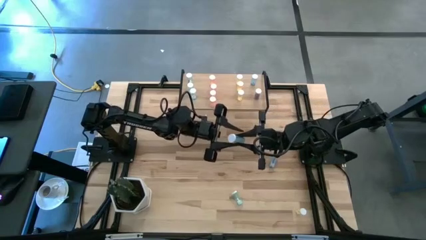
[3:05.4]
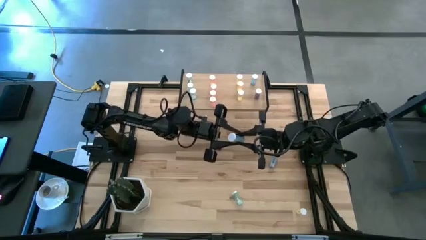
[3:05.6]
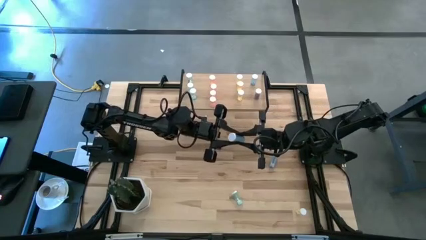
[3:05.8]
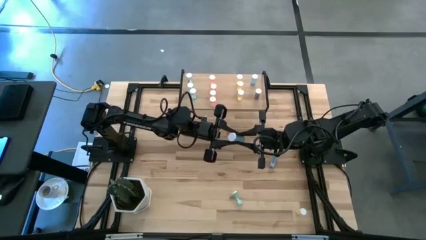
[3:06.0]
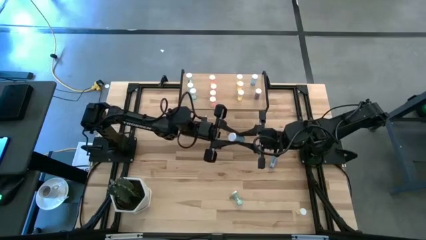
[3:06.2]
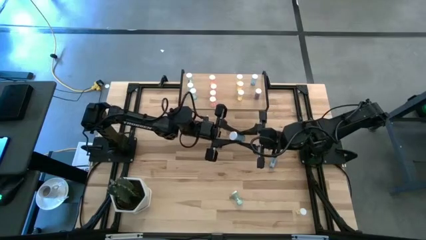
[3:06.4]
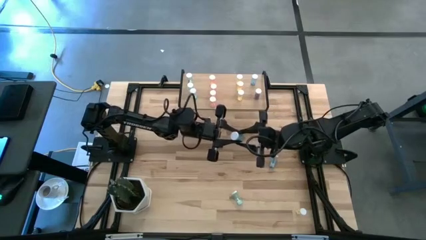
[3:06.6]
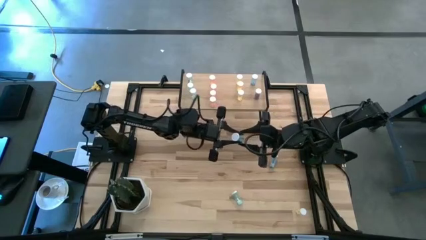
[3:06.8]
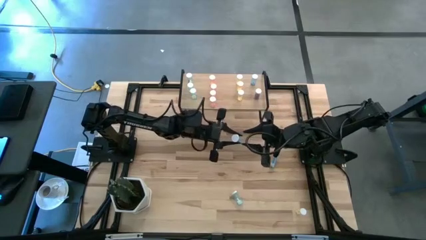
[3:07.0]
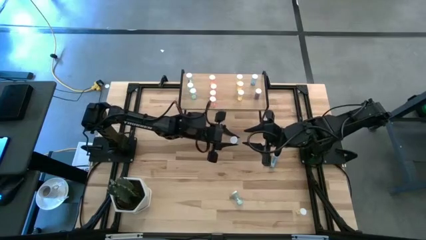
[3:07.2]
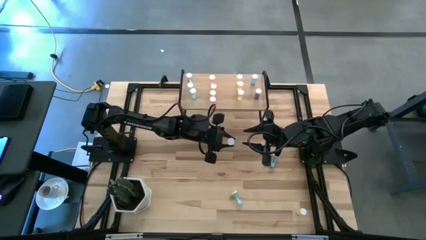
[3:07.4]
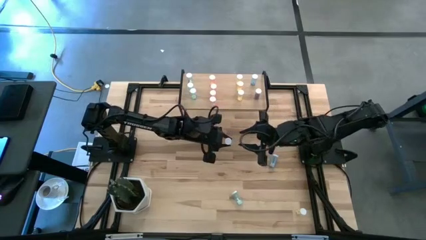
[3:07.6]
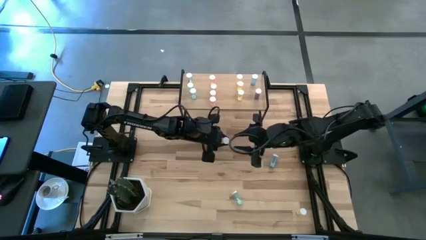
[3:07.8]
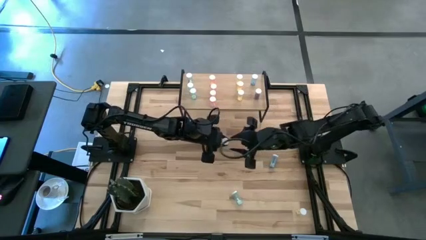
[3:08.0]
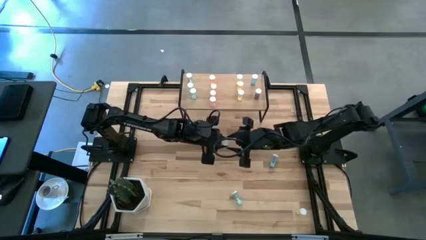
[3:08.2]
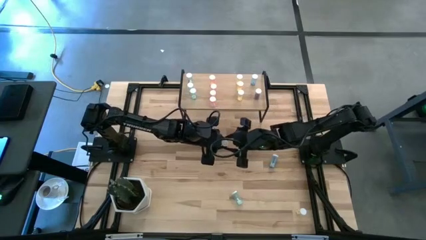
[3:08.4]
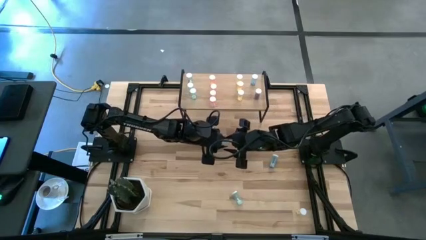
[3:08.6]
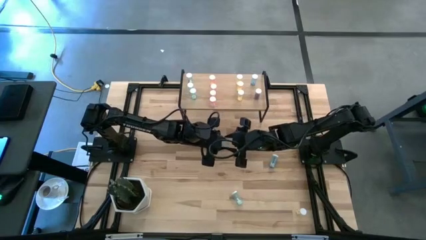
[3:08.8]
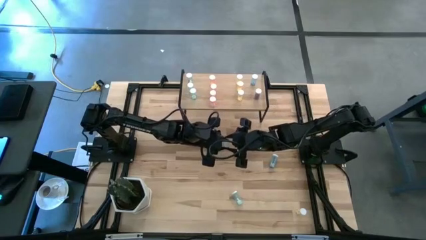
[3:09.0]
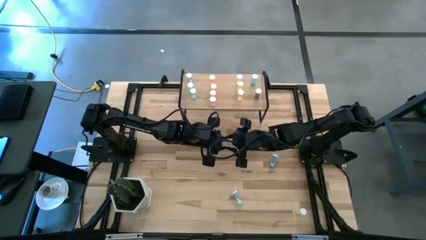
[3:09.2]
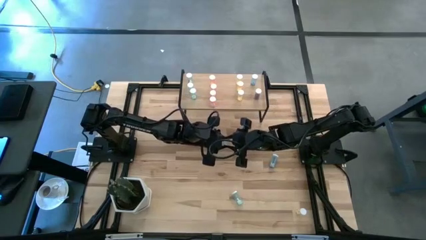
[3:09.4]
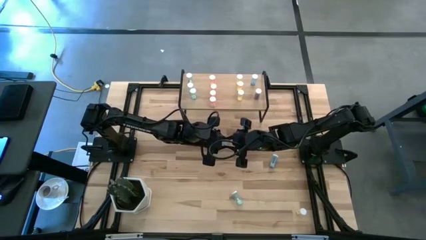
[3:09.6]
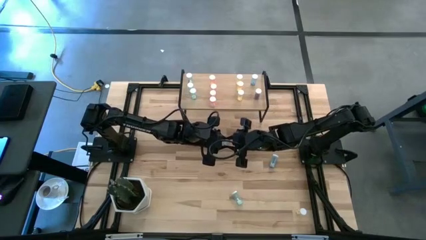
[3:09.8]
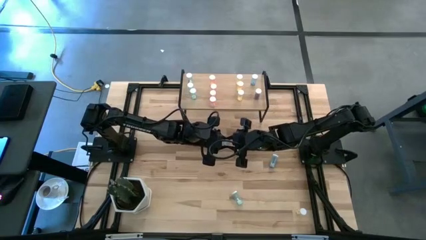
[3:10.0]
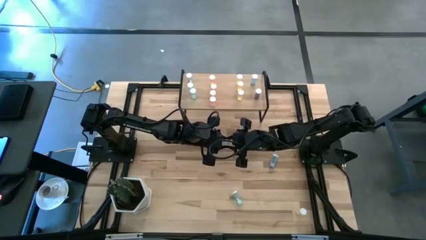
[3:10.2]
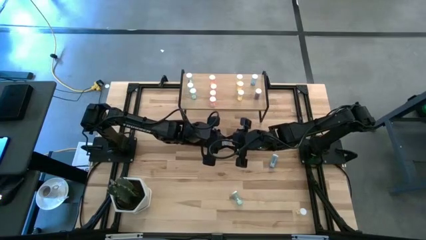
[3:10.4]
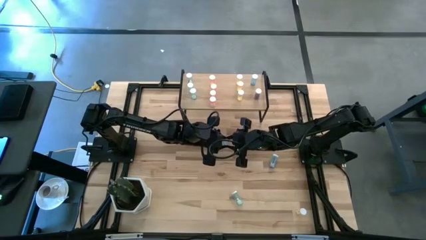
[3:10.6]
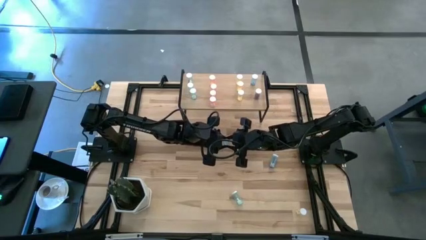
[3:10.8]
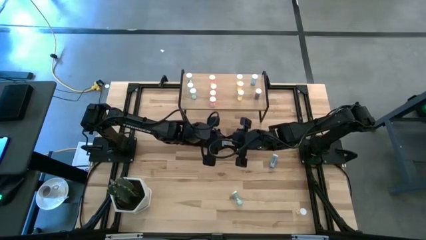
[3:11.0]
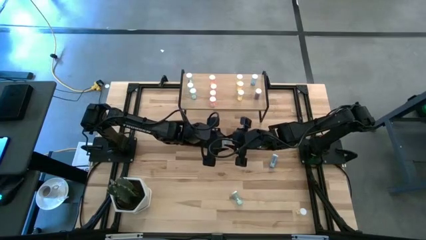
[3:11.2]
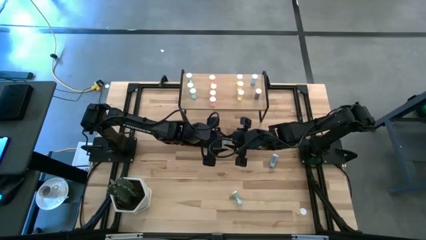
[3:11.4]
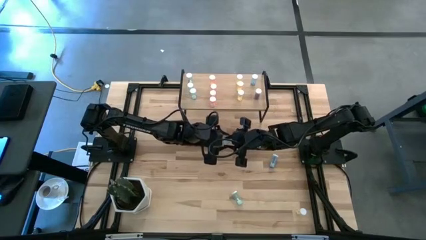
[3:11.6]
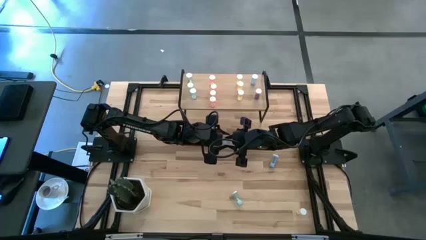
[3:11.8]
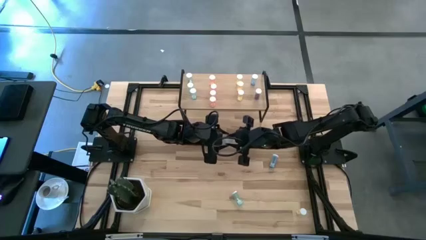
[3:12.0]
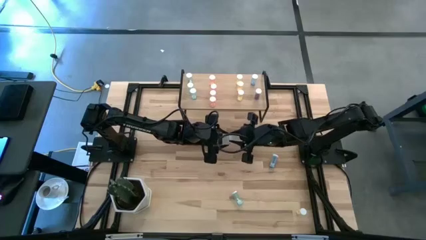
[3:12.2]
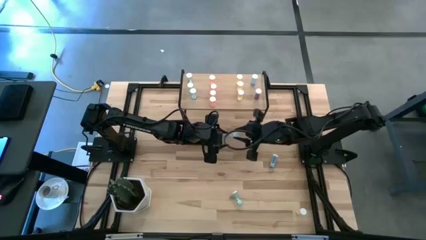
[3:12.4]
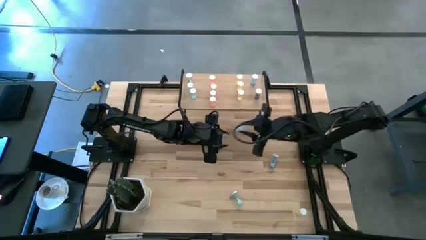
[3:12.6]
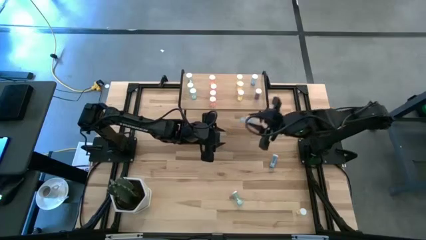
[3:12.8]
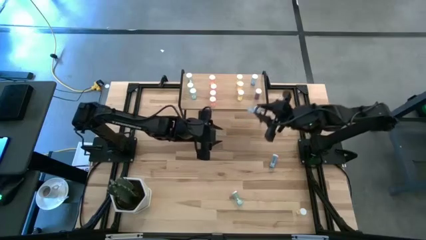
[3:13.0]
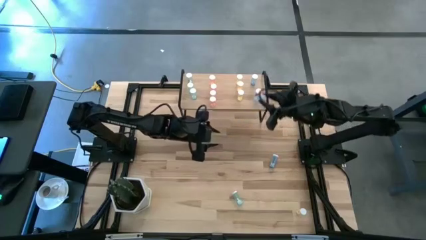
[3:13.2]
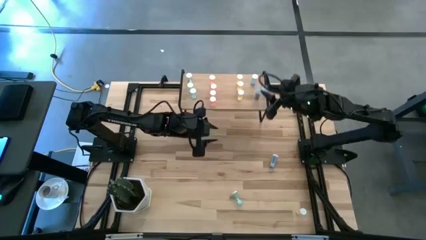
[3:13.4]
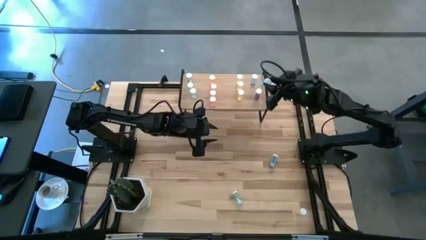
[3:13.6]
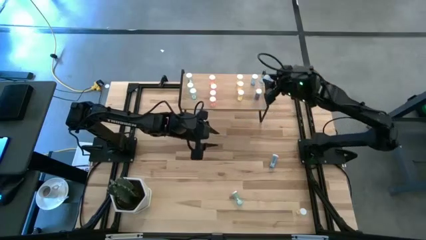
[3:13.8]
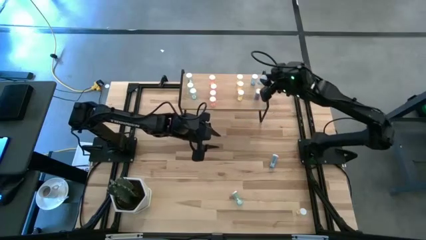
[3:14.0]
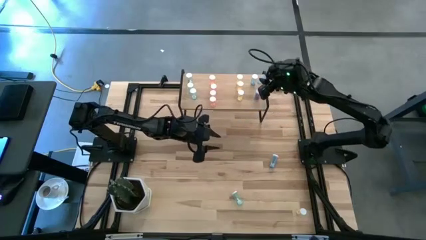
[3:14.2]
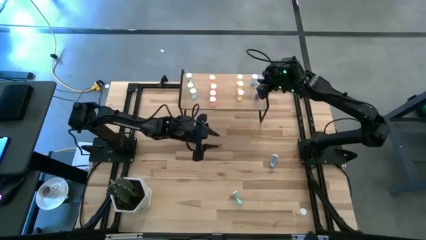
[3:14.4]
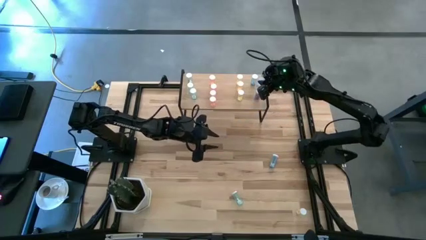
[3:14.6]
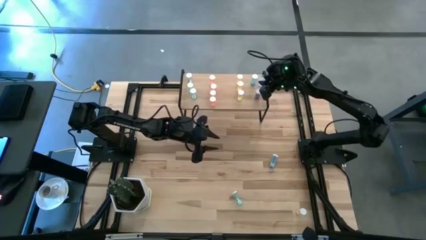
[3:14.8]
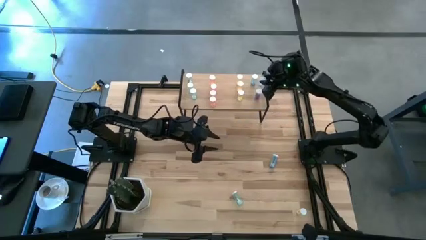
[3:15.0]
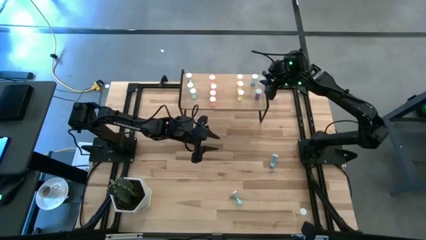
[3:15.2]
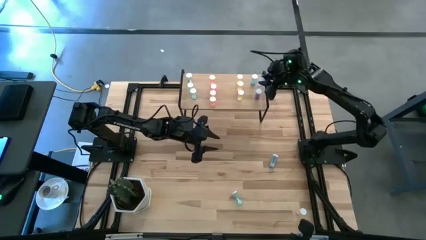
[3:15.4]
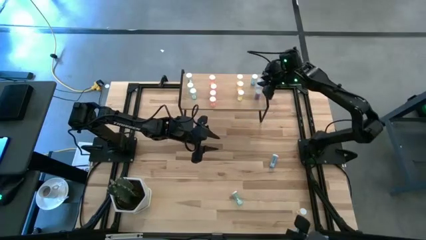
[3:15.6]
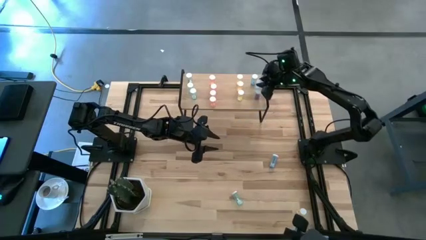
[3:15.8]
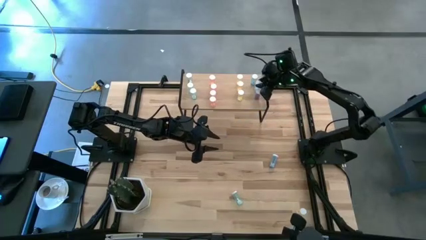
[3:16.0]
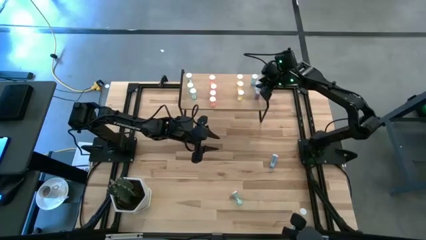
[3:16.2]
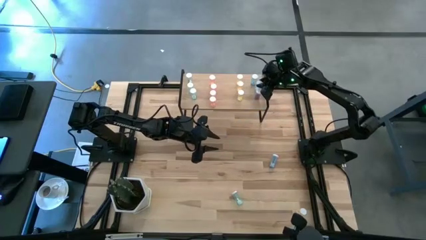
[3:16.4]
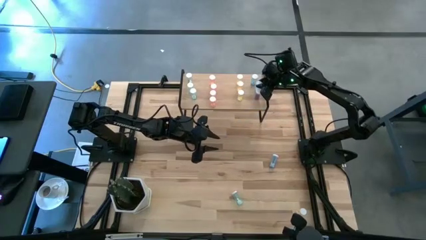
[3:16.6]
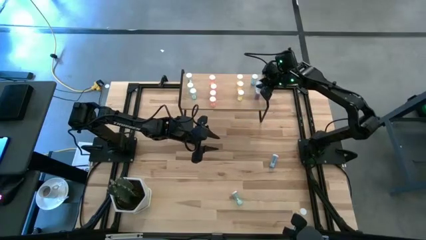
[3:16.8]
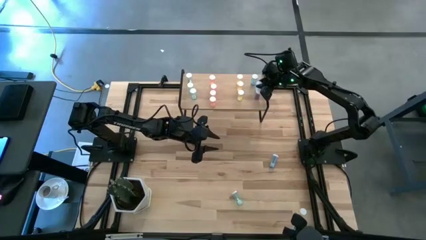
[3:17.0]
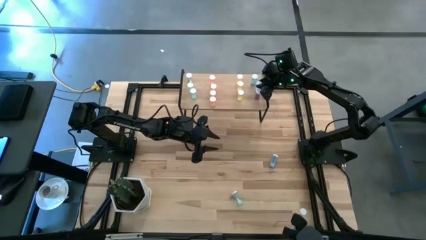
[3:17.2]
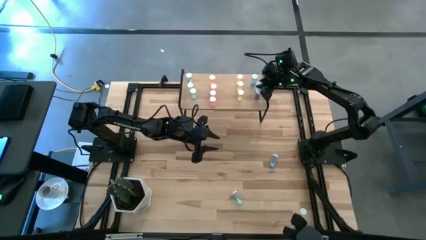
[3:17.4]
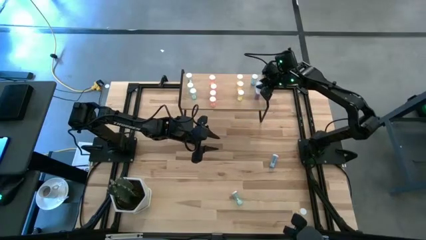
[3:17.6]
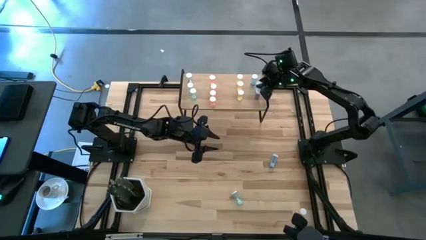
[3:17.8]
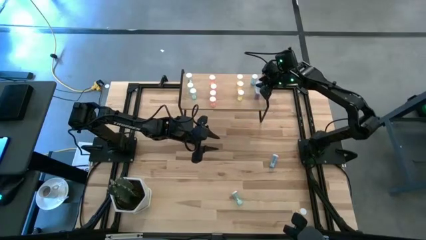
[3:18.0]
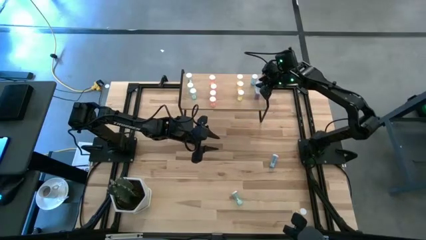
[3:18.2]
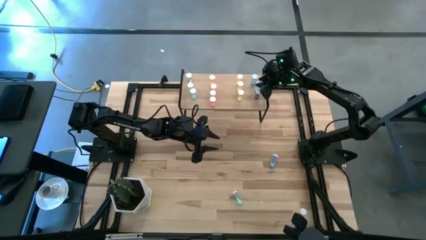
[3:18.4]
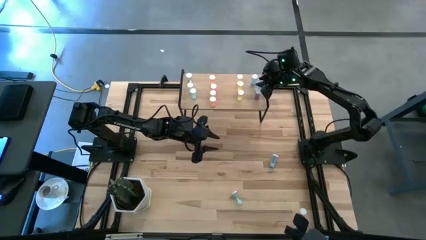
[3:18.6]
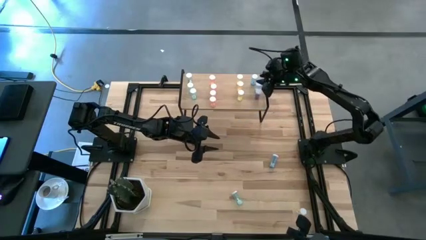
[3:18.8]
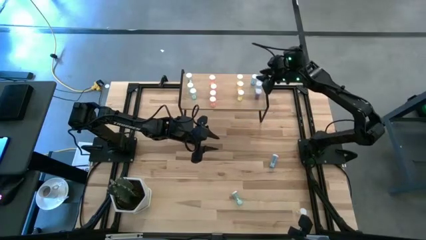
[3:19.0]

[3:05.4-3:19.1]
Task: Pick and place medicine bottles onto shelf by color
Align the blue pill bottle with the blue pill bottle
